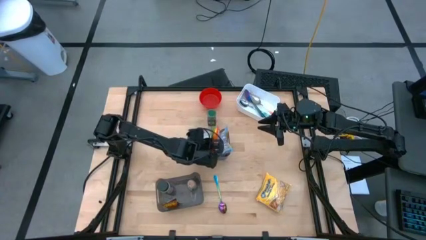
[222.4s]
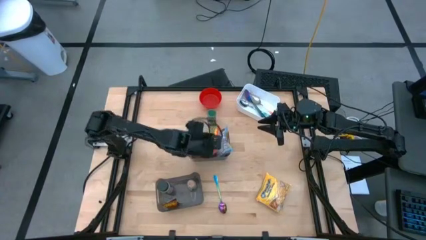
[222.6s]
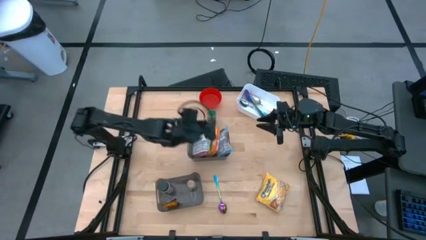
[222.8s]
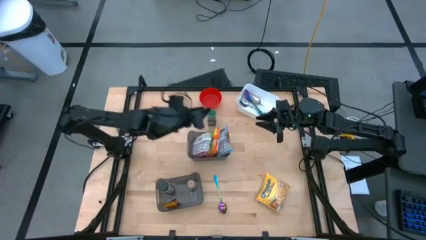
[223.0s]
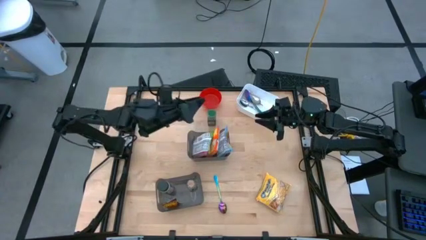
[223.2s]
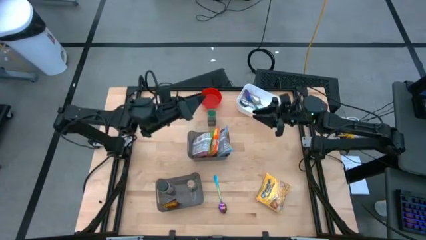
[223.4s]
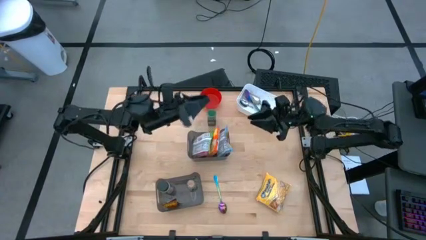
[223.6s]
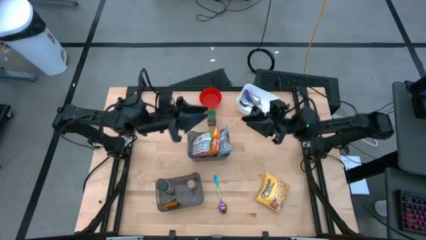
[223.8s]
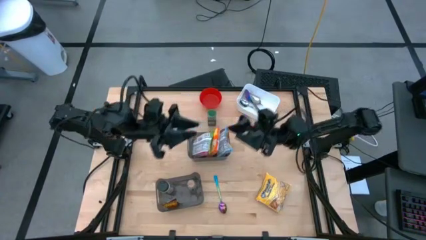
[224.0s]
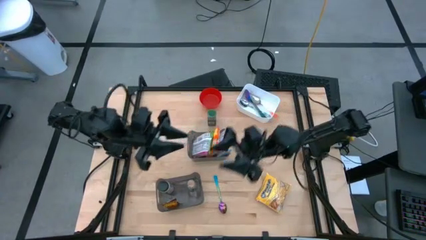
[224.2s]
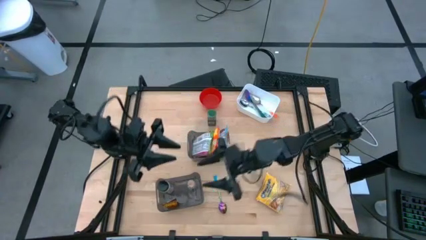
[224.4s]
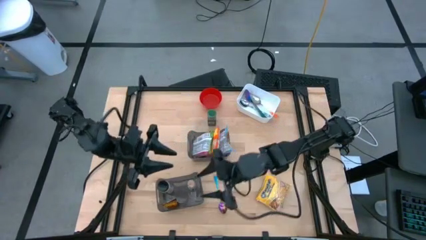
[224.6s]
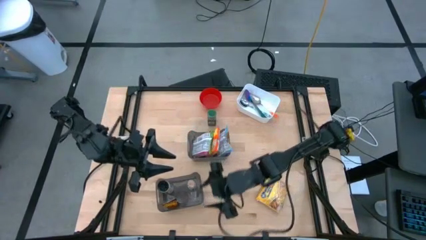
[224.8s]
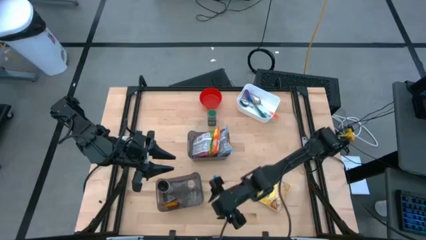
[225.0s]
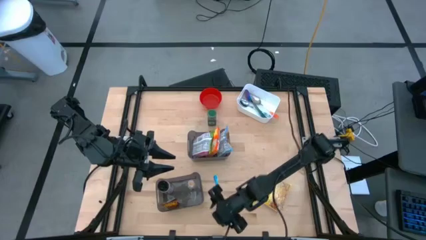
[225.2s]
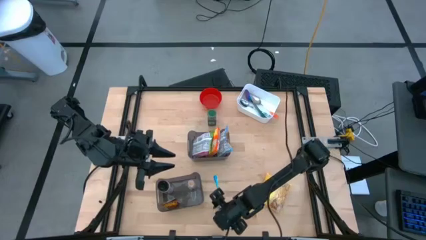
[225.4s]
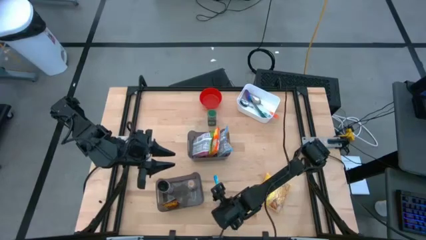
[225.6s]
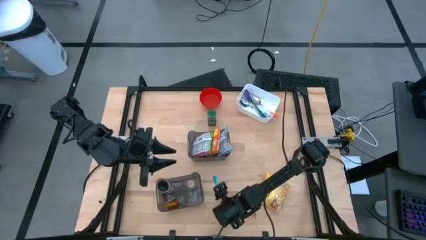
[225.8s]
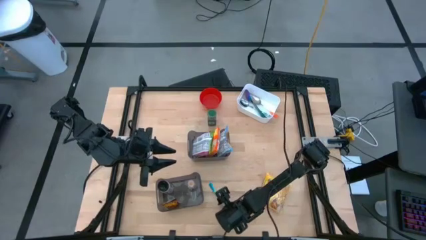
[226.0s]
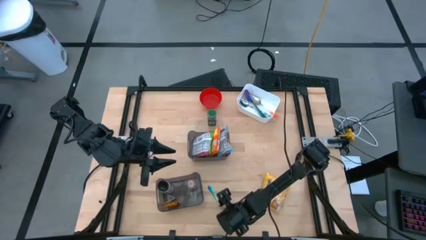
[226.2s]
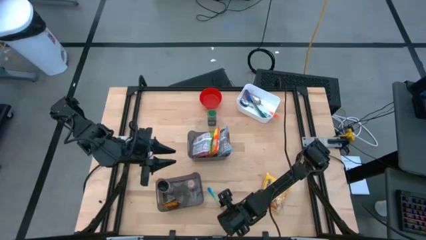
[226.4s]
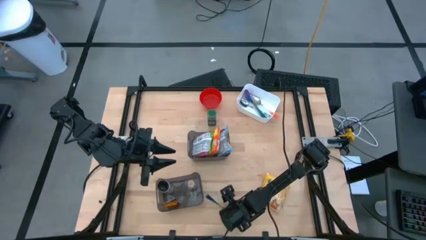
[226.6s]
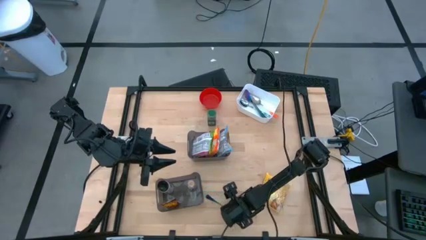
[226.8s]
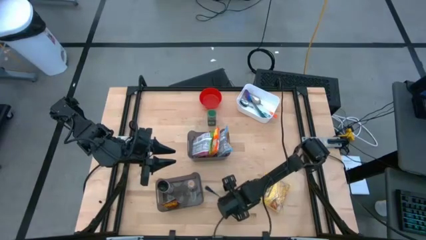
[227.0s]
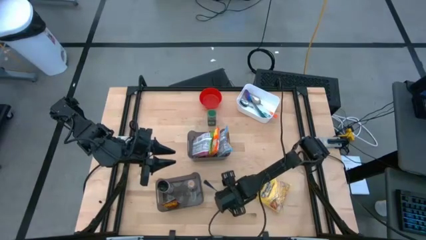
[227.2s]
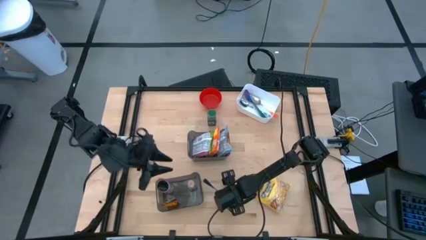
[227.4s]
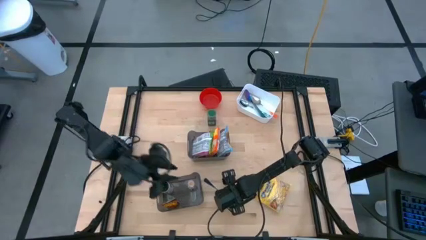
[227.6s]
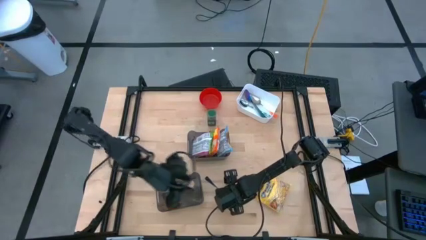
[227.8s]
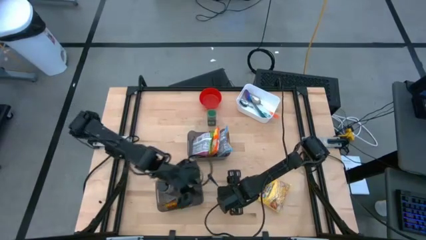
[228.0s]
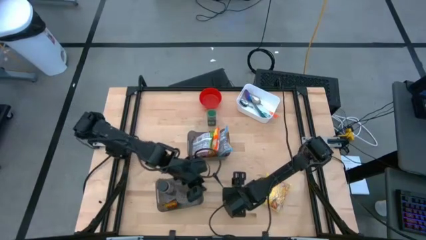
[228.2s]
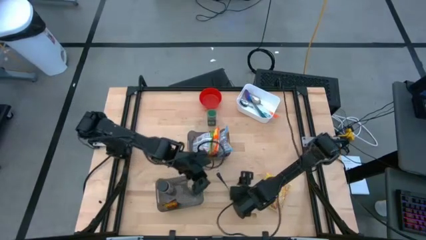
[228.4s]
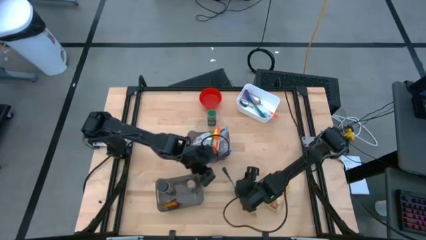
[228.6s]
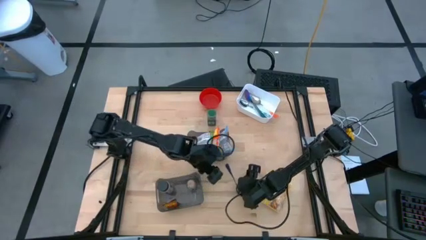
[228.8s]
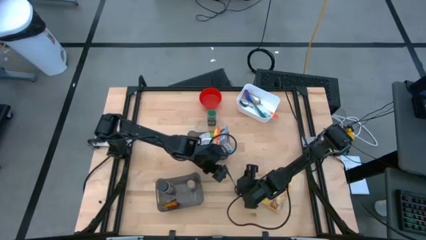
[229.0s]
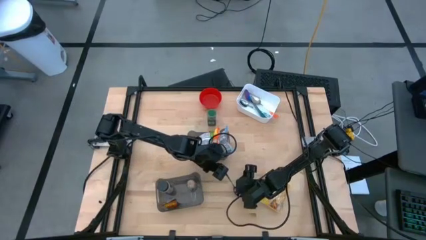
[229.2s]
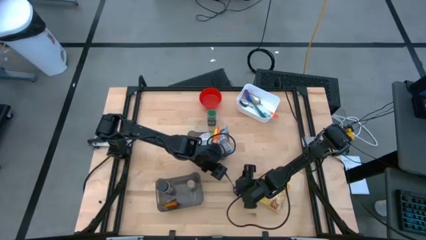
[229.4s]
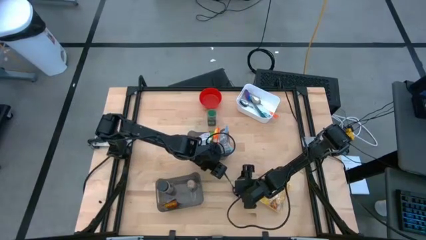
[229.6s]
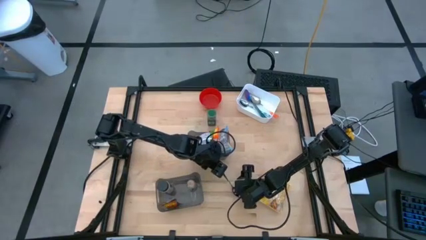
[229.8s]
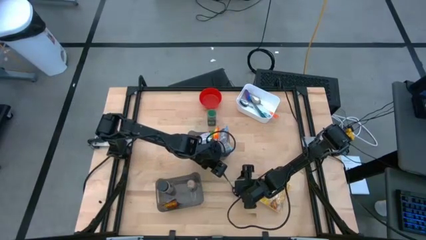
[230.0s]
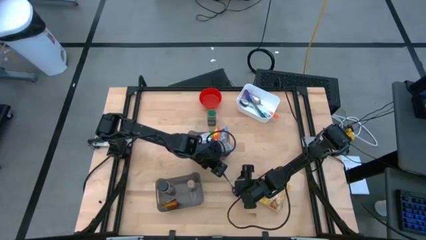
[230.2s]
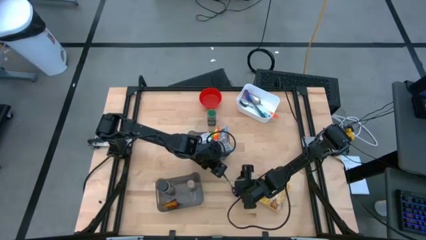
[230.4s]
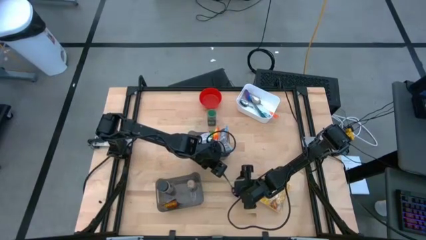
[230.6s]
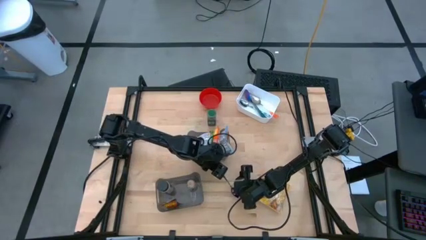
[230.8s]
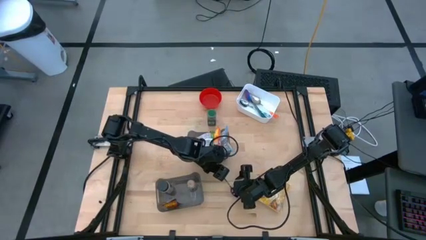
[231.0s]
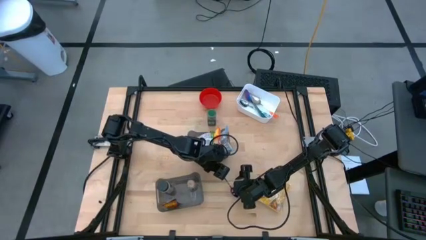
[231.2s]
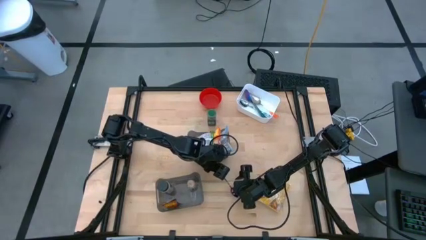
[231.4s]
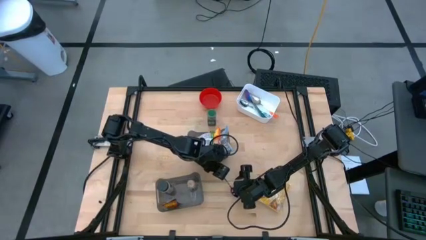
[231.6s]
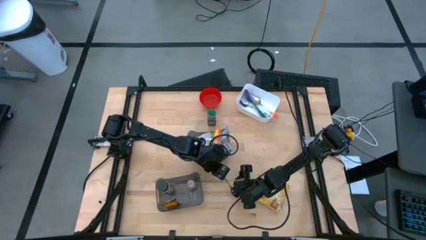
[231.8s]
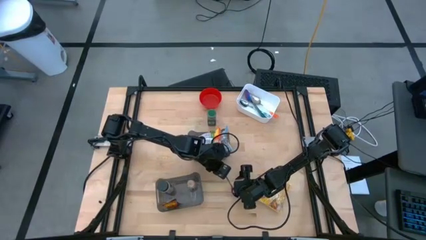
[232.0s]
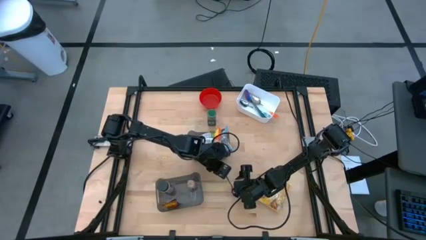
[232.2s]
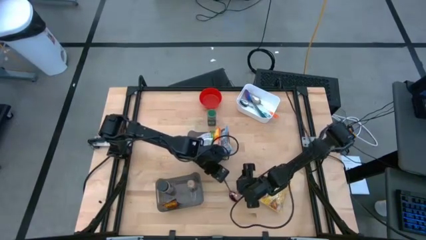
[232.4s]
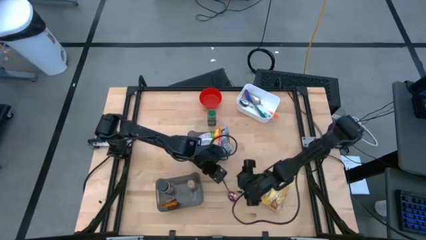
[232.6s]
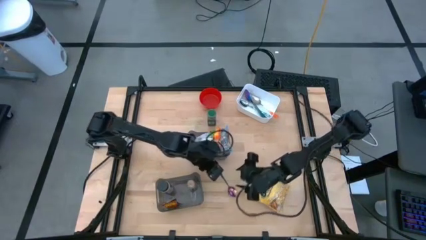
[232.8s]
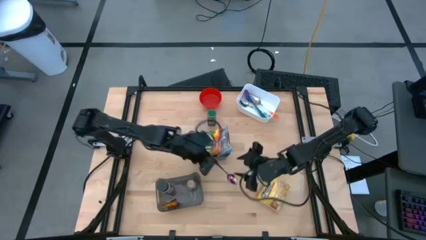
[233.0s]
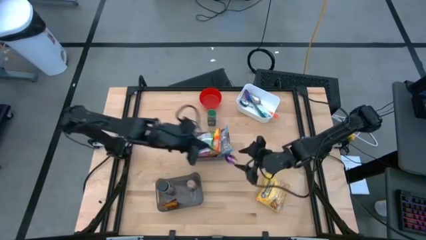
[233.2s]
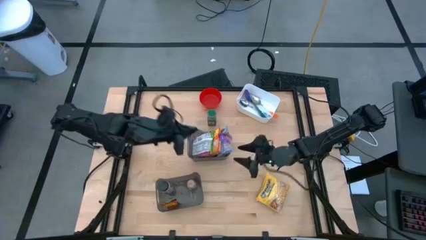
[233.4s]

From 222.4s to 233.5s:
Task: Pick & Place Food Item
Put the purple spoon into the white bin

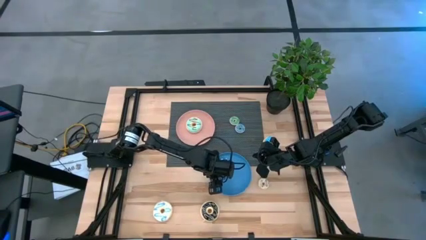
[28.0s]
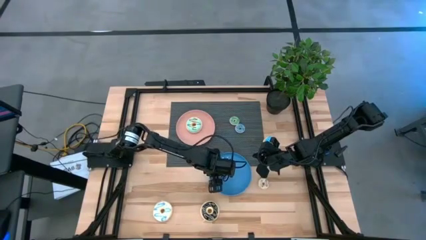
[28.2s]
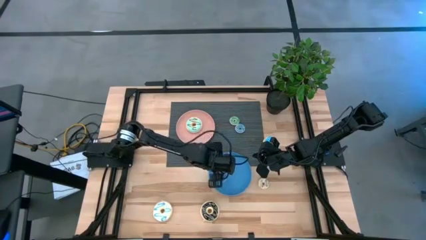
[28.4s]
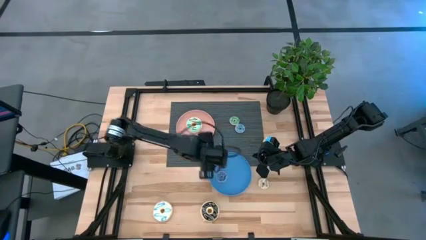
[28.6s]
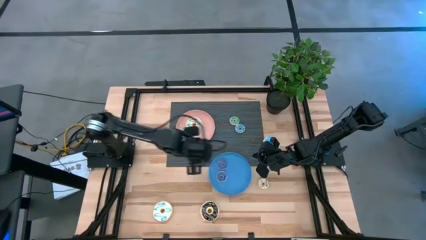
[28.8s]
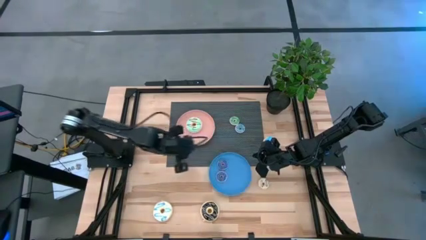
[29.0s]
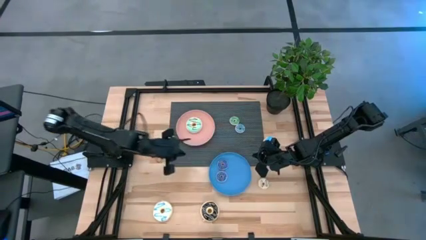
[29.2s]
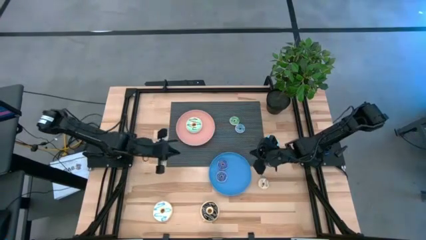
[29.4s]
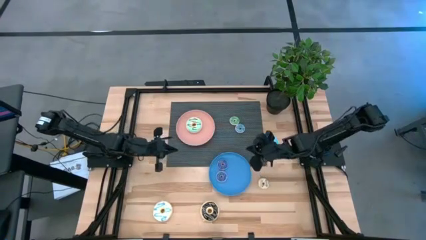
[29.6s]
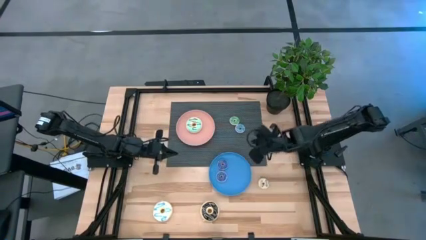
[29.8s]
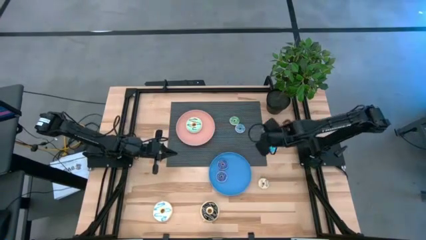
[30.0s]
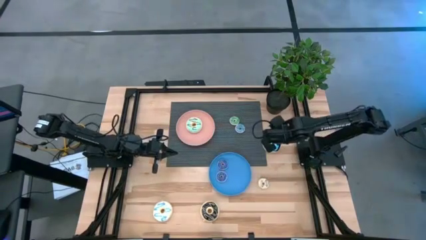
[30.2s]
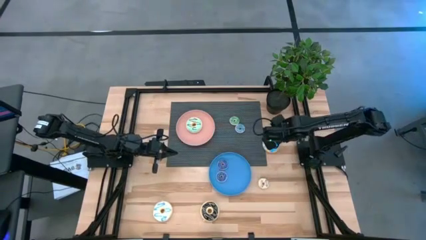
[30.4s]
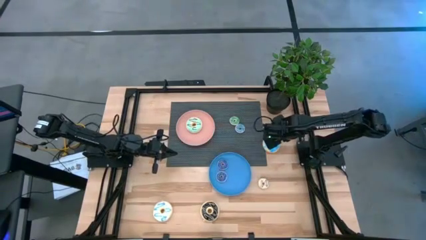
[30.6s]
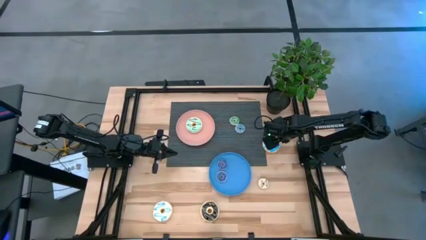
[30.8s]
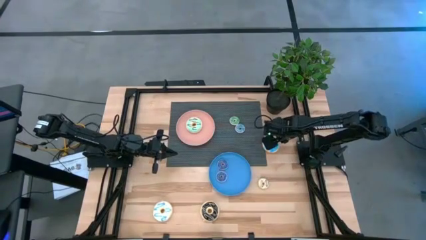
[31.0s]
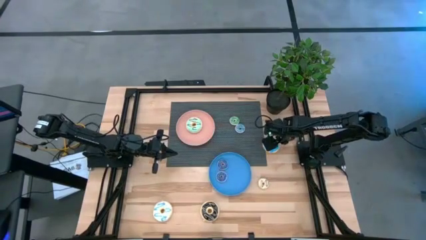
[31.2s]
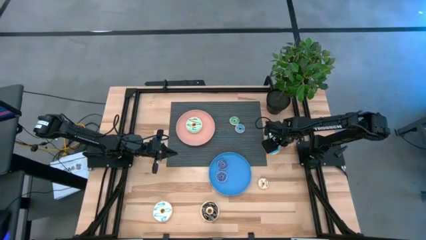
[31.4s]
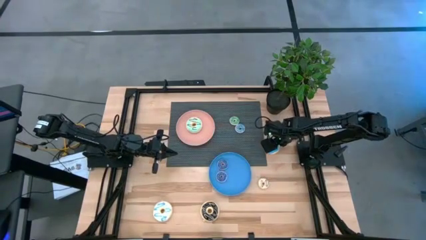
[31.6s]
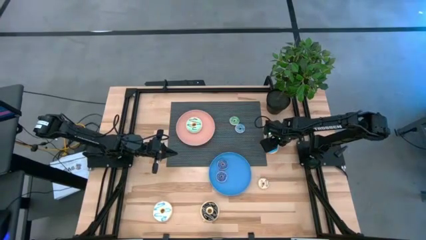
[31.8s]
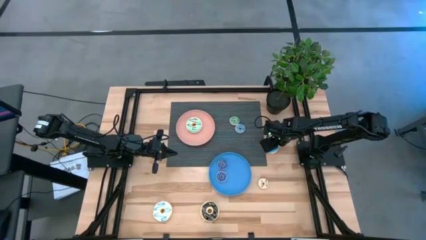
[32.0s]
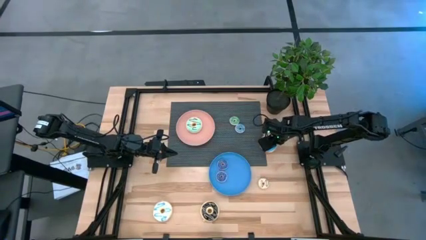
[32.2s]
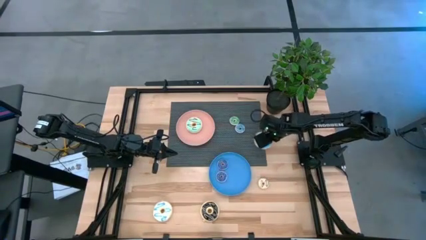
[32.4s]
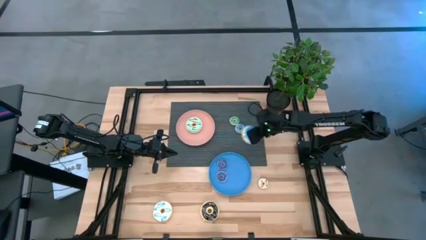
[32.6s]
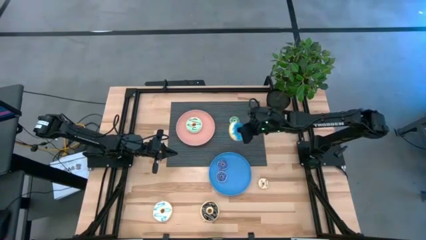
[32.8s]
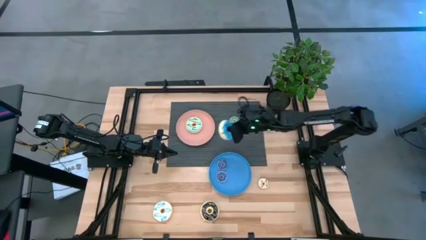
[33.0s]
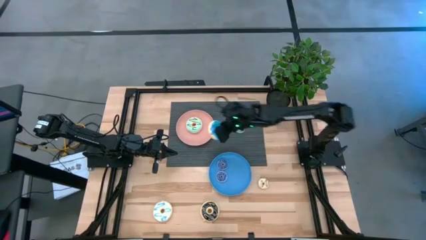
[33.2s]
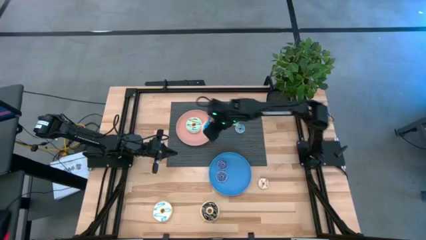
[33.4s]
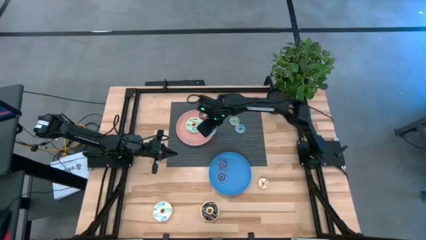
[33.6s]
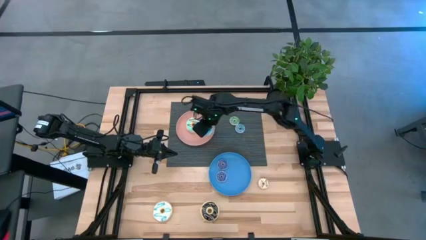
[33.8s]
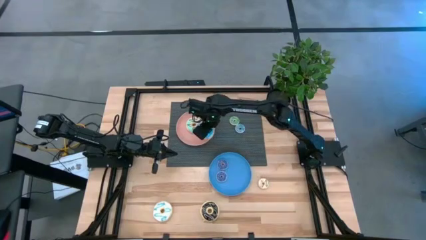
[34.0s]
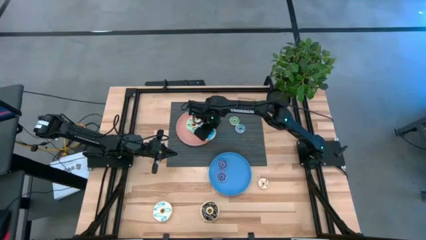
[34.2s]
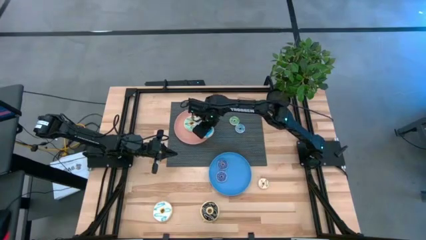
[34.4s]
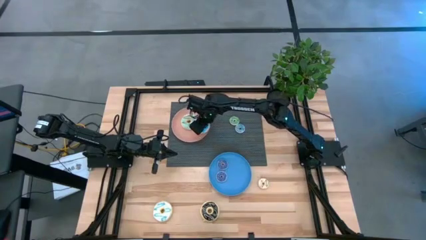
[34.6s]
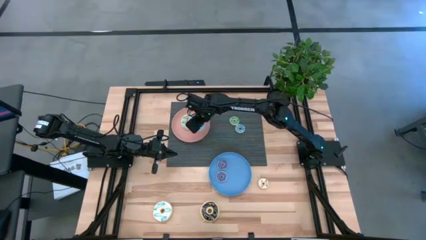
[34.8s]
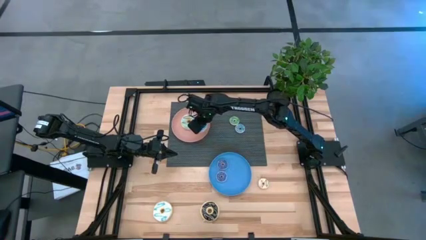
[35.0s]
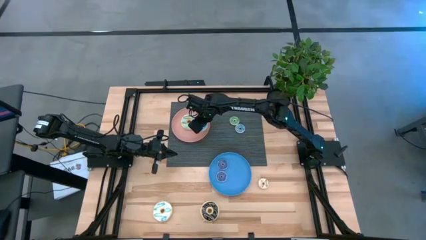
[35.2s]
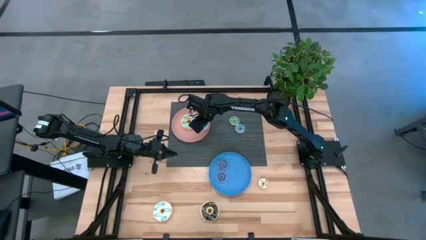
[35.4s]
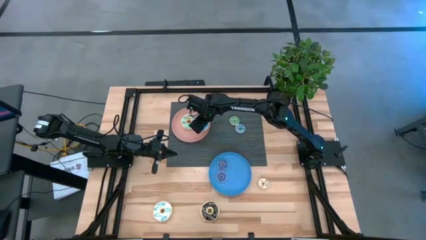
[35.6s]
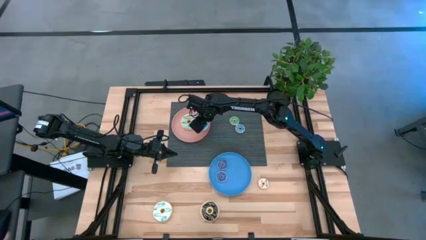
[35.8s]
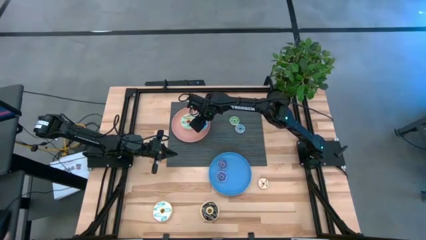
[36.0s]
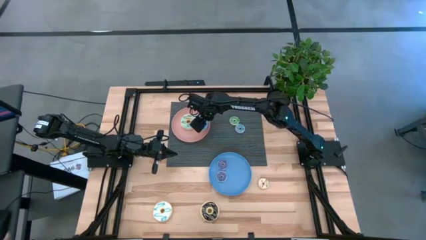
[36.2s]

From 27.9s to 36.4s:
Task: Pick & Place donuts
Put the large blue donut into the pink plate
